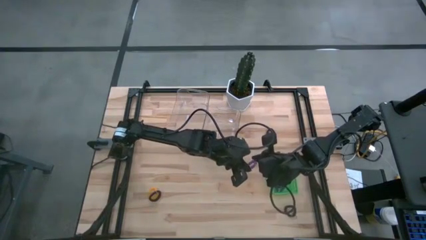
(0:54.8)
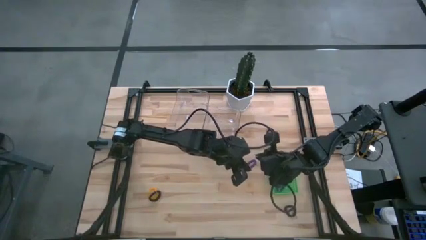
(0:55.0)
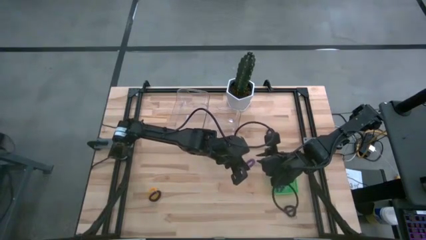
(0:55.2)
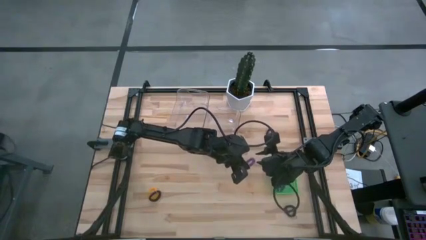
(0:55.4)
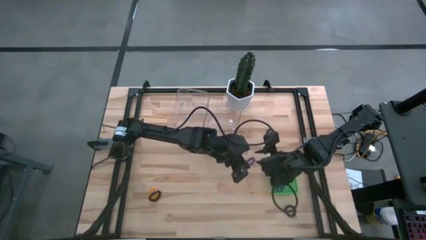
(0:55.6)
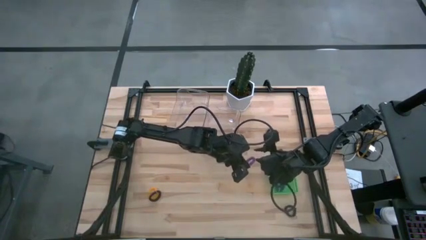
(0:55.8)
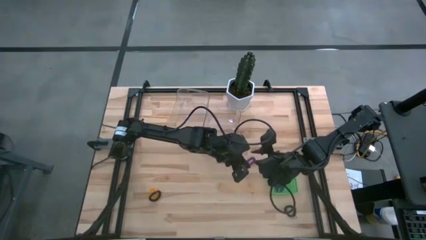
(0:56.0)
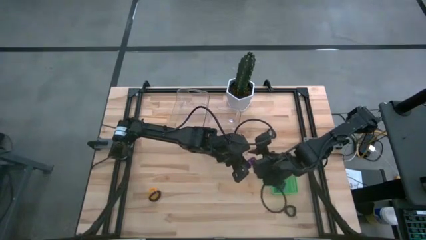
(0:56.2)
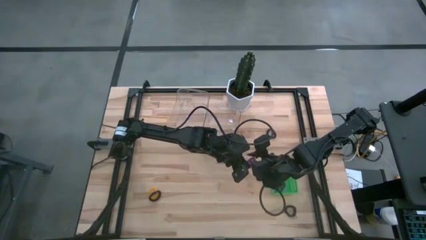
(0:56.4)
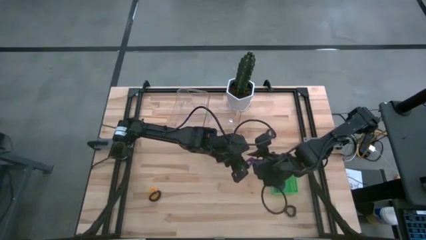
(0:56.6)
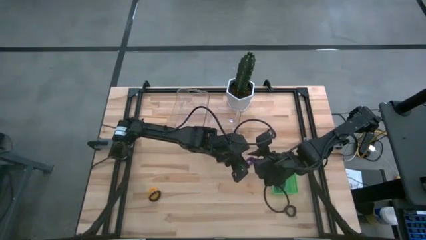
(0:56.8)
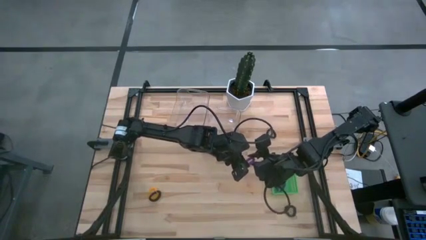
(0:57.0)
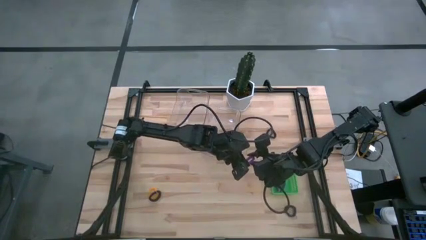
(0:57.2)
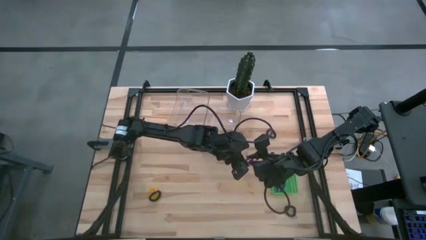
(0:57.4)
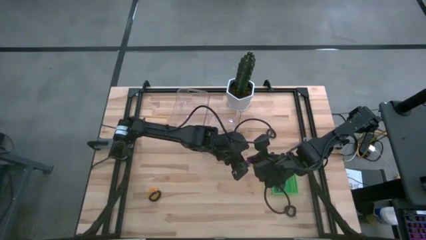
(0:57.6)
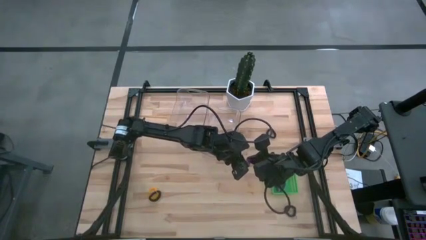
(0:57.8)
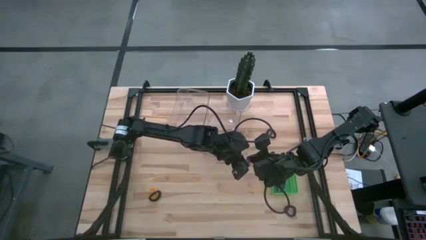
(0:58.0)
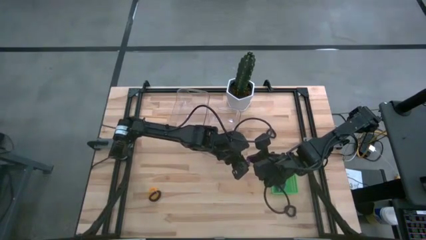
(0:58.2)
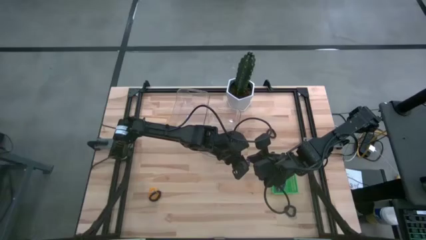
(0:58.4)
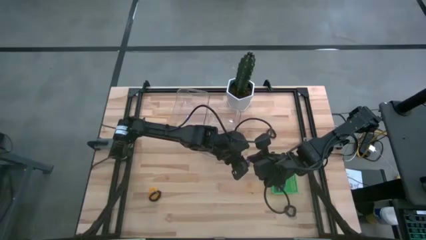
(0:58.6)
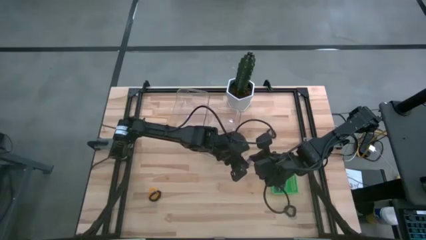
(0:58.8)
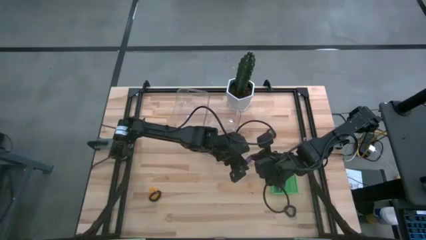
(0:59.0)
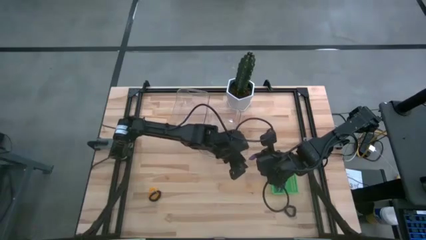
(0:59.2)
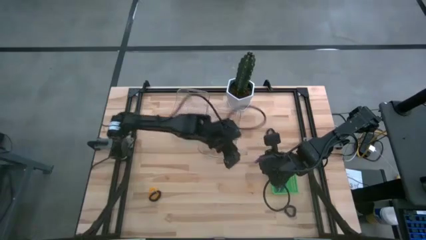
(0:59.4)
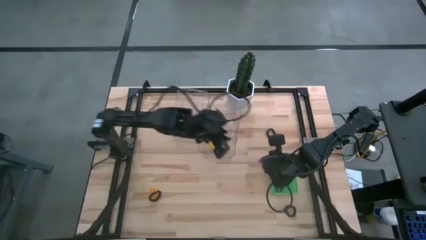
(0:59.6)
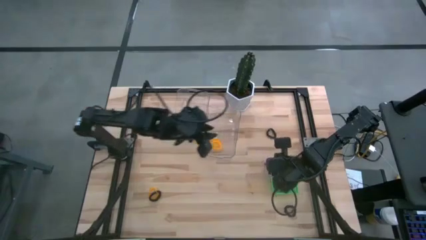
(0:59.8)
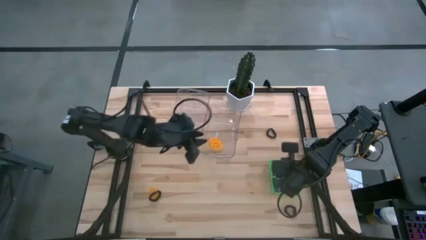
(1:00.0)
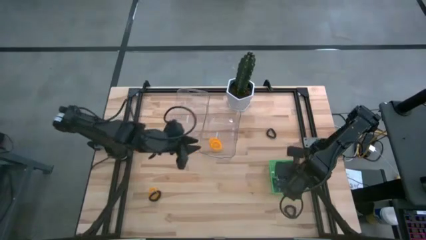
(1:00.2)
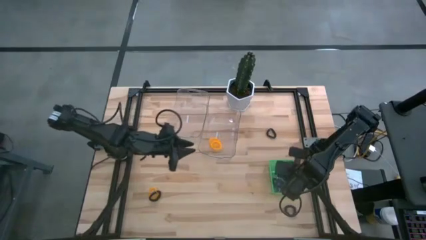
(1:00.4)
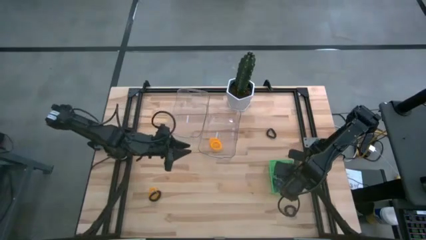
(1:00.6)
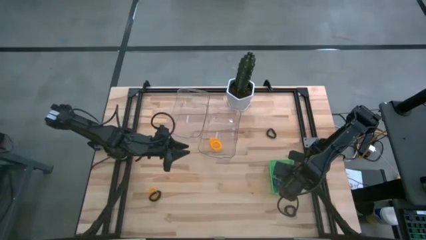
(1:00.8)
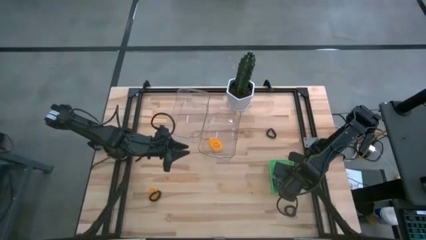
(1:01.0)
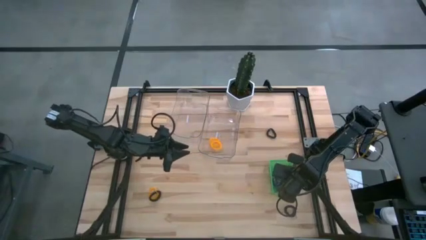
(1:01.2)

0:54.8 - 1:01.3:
Task: Sort spring keychains
Put the violet spring keychain into the green bin

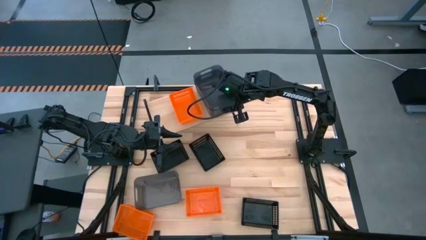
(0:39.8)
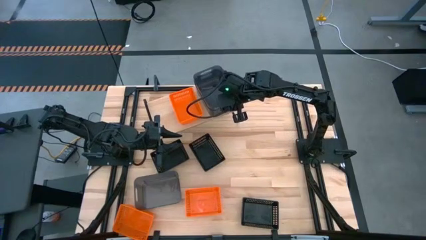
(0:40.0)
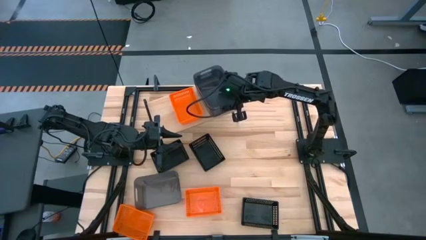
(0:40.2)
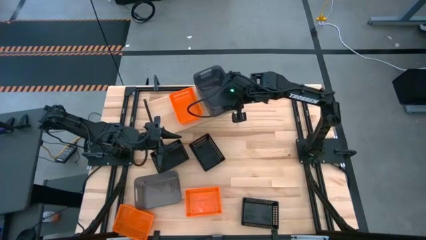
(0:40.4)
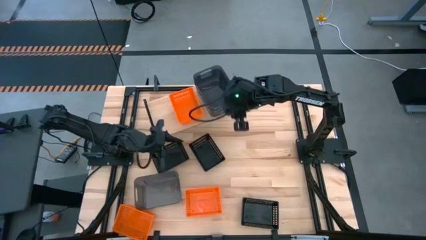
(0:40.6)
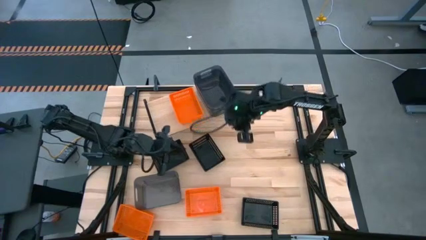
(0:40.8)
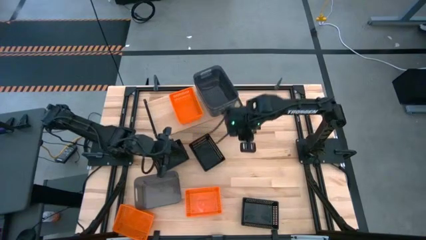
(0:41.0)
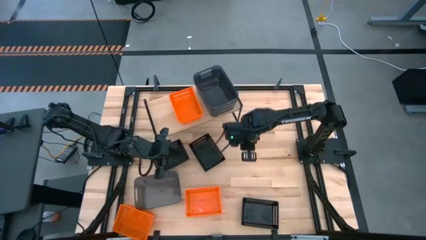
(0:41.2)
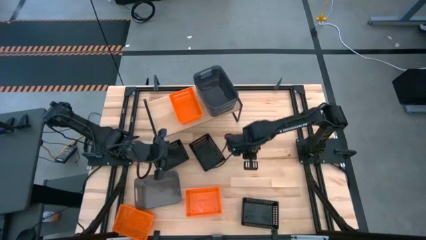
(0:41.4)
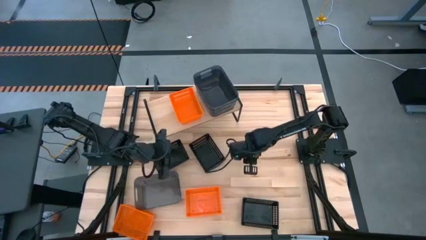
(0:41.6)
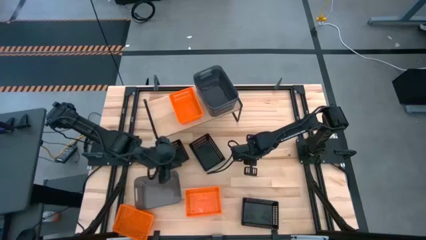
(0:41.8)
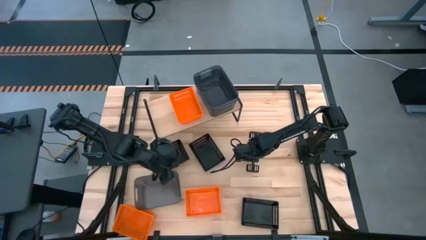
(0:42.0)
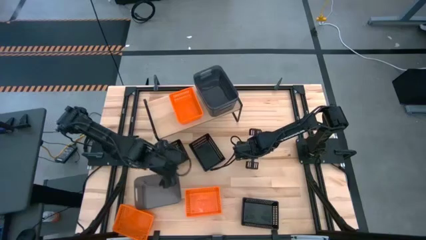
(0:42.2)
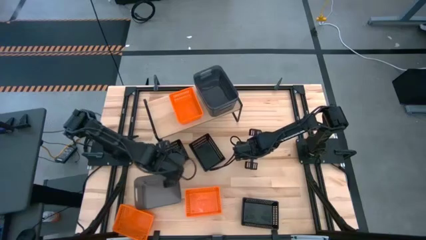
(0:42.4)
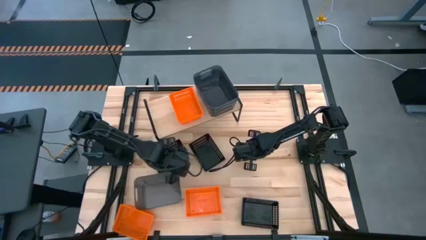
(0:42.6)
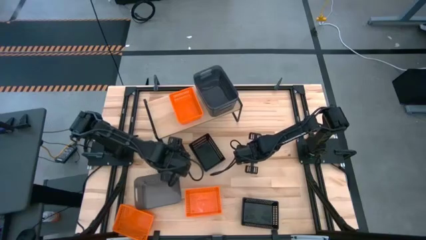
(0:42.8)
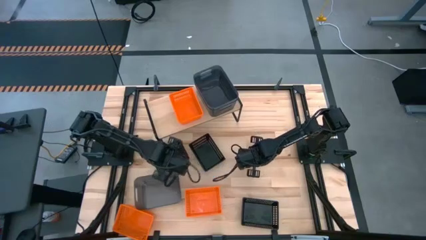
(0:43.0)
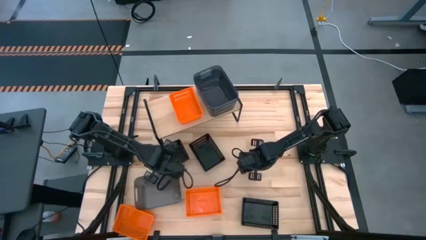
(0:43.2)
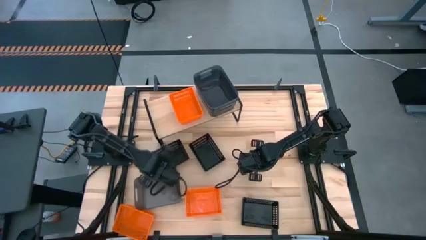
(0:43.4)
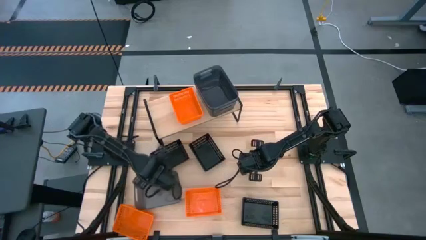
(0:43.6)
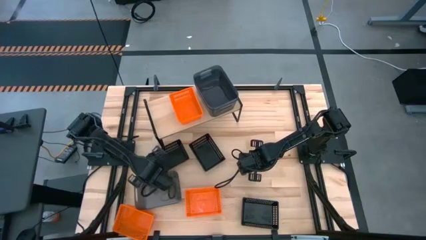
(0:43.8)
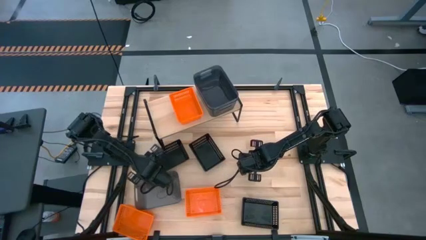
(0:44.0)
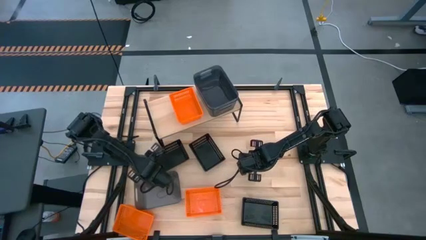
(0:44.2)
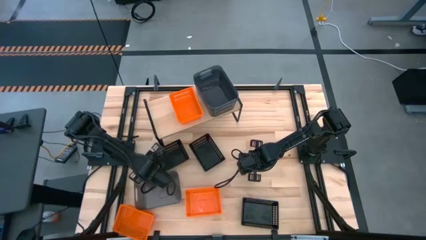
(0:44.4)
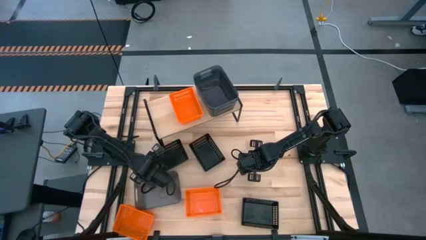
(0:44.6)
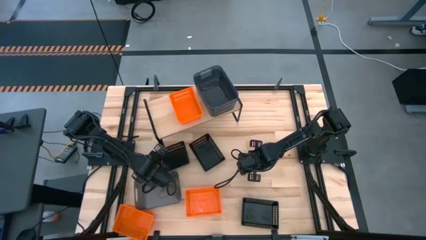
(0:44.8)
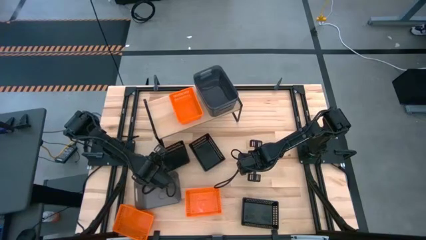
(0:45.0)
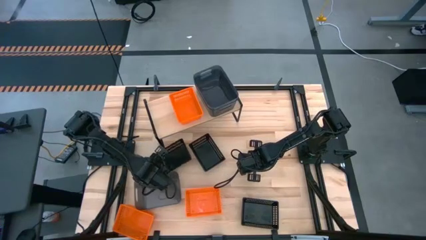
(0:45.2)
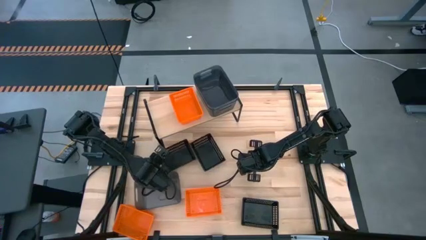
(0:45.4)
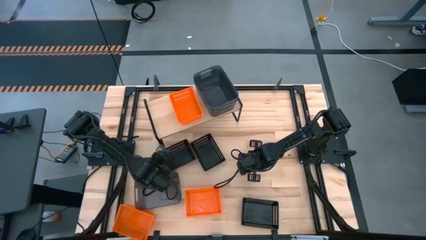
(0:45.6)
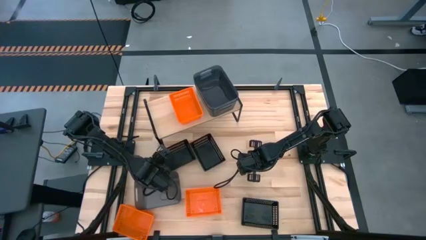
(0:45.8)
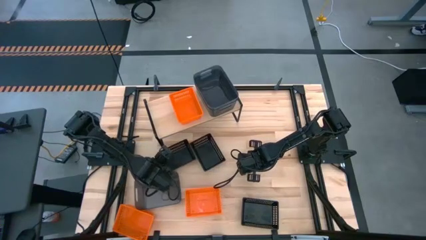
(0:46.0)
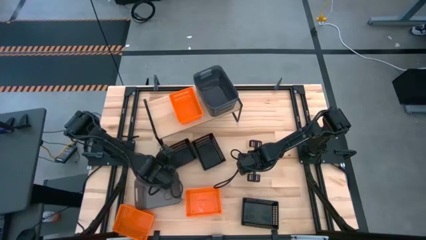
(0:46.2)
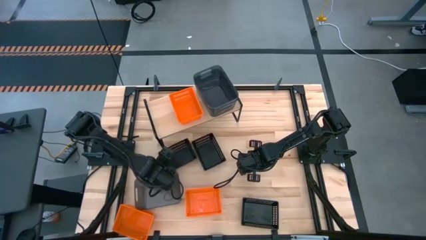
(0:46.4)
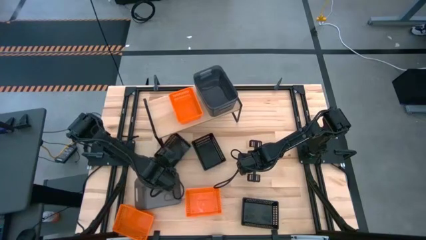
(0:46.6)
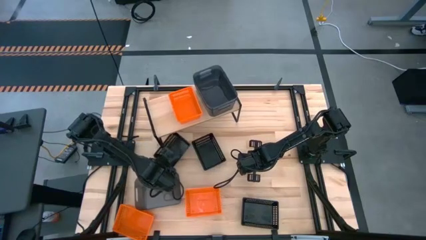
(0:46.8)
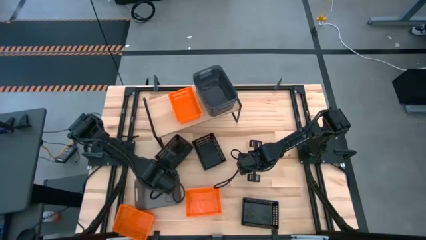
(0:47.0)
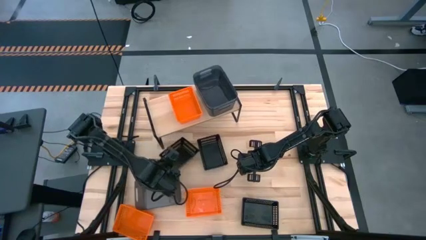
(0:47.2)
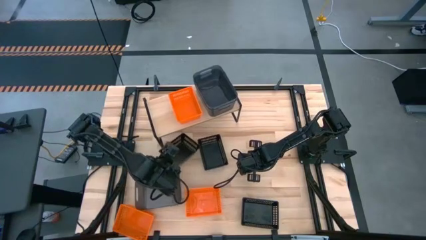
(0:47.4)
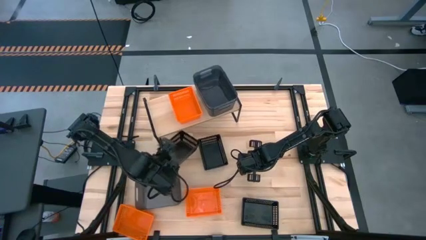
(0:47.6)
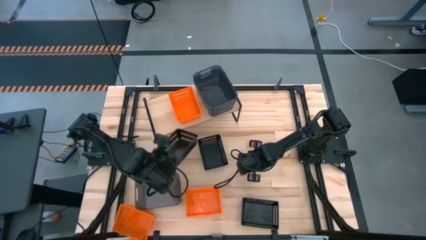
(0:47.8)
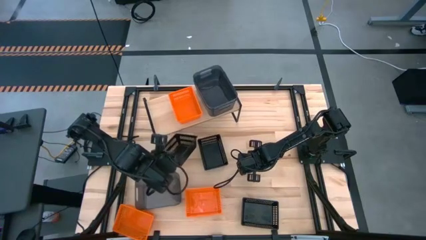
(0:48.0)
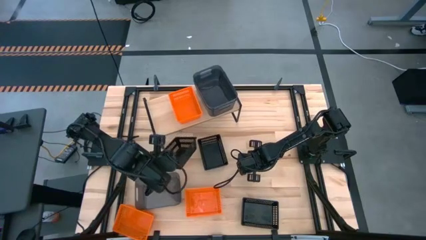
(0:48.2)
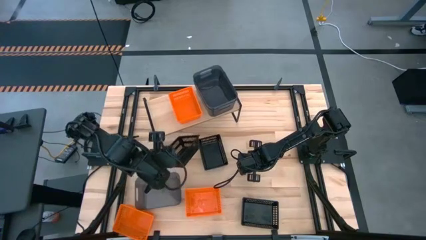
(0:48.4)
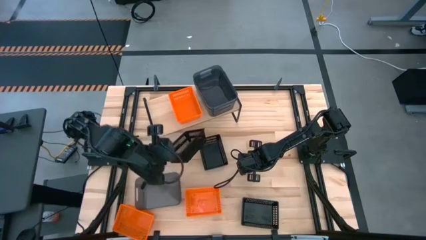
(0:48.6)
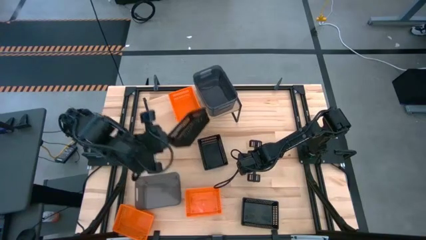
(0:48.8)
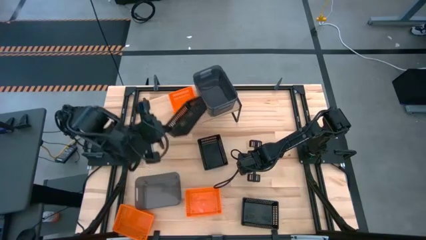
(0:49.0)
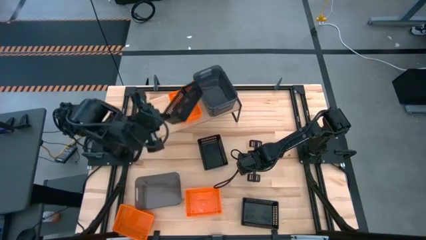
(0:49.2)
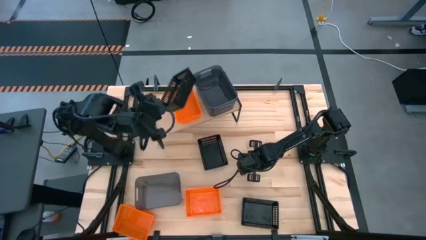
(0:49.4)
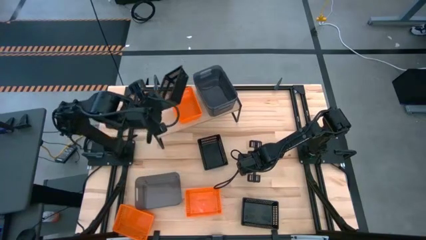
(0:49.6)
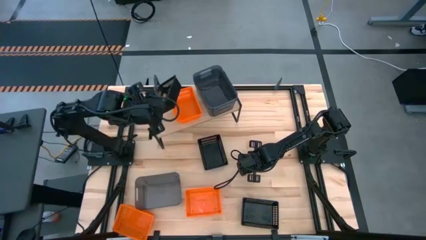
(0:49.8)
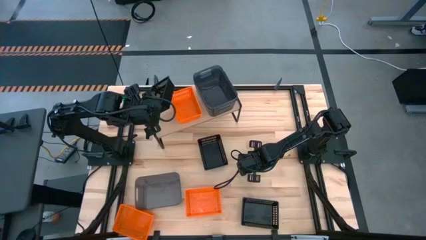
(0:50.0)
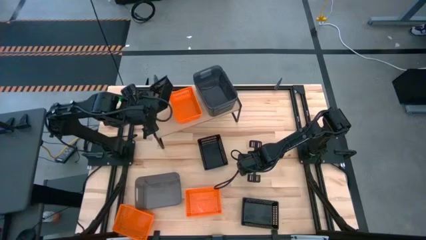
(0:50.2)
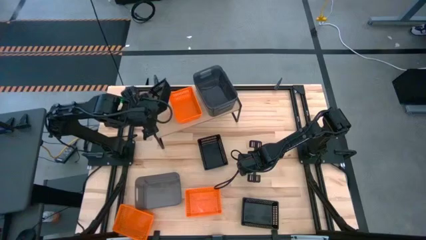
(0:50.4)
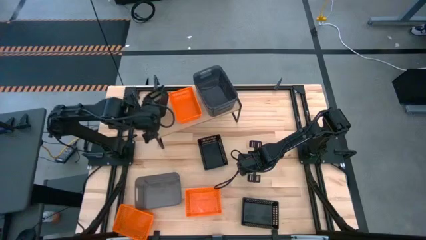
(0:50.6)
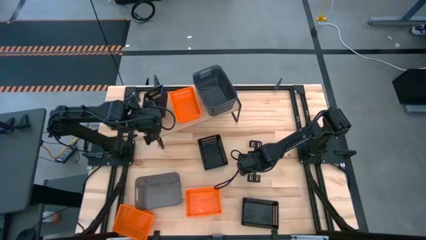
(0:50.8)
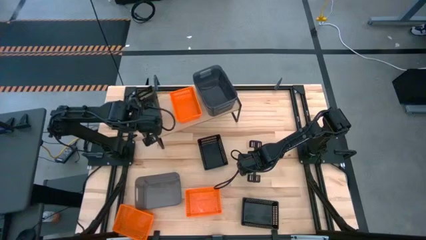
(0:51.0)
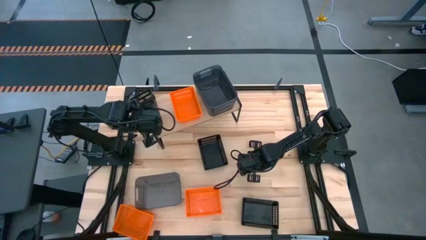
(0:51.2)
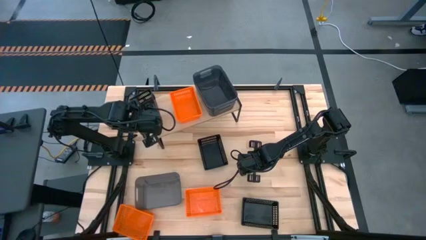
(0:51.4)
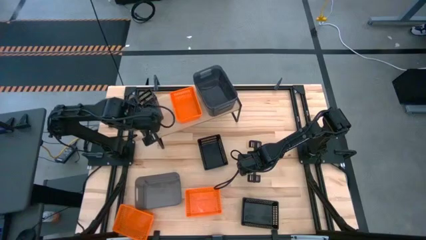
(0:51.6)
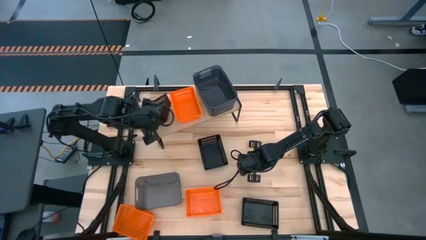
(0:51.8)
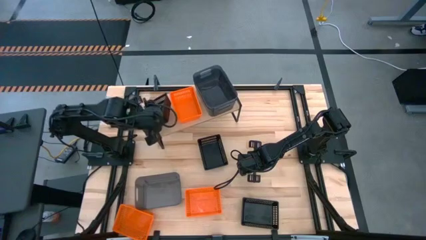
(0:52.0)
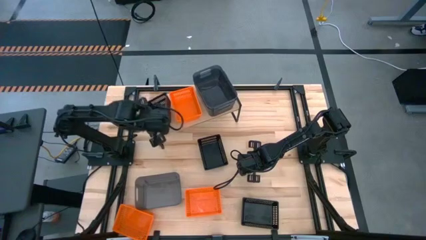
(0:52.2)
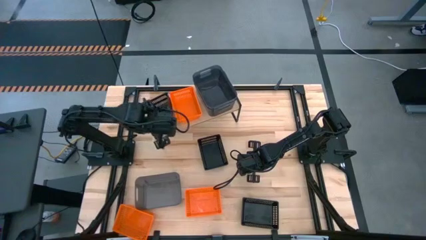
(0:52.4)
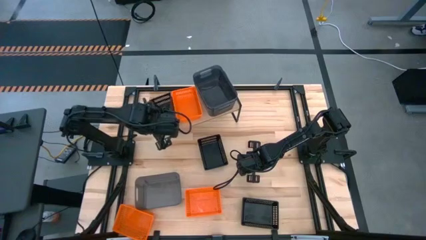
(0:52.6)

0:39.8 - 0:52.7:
Task: Stack baskets on shelf by color
Put the top left black basket on the shelf
